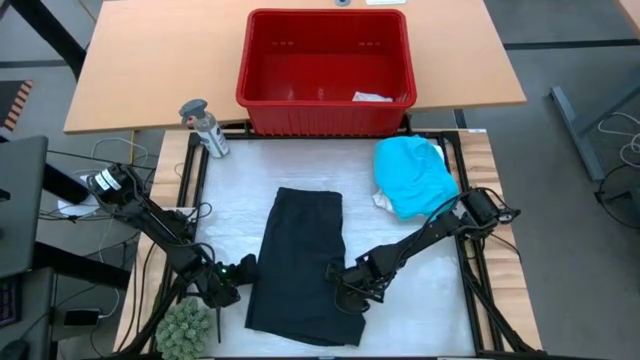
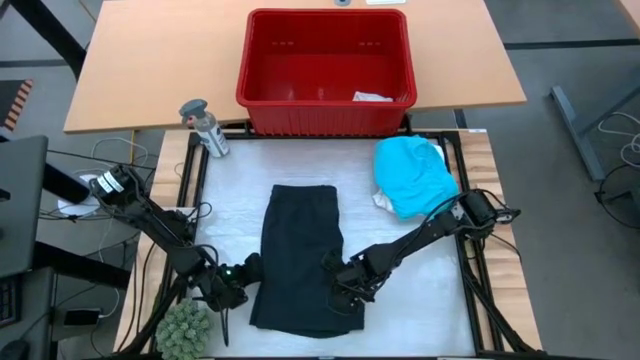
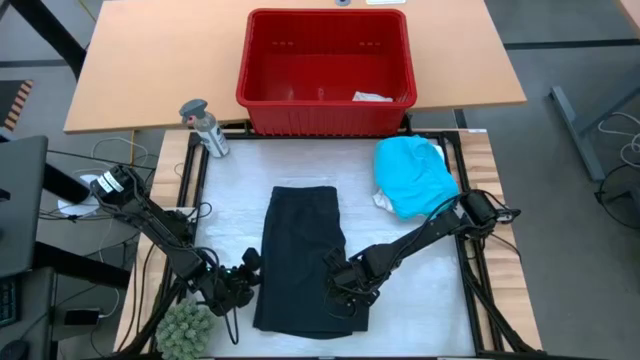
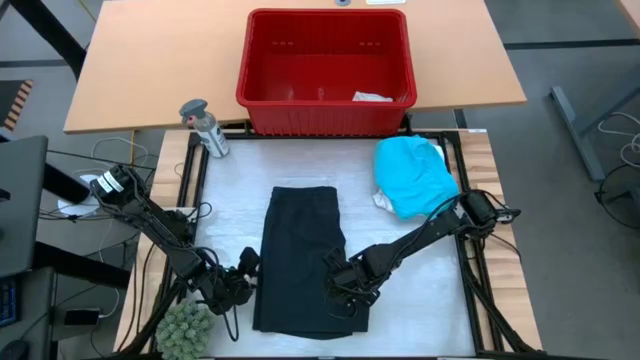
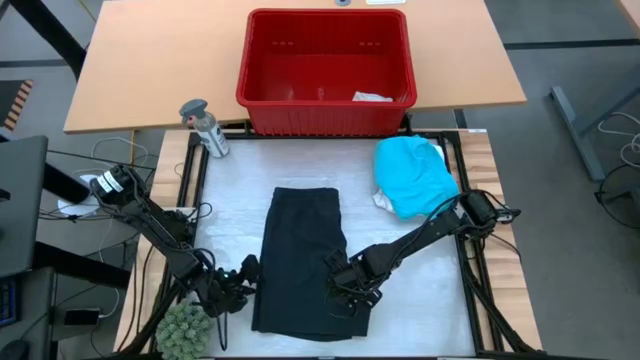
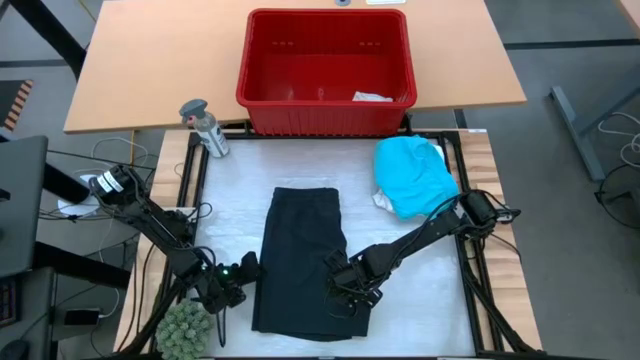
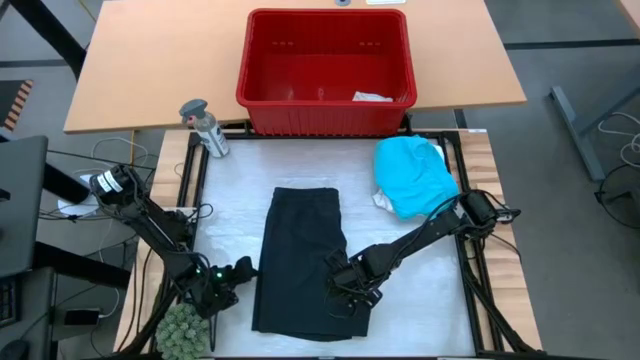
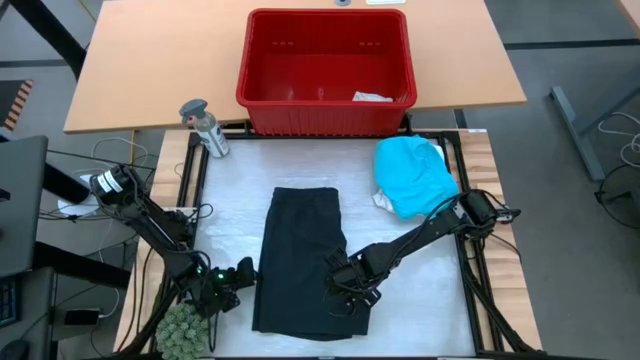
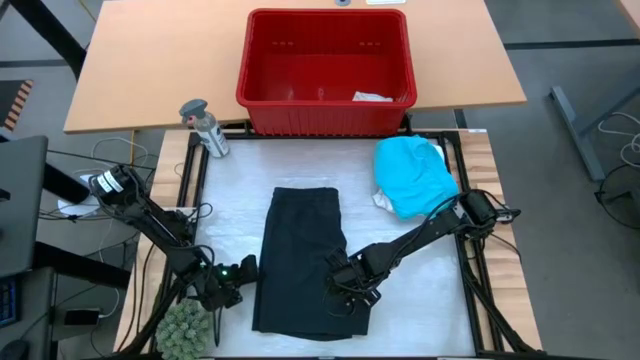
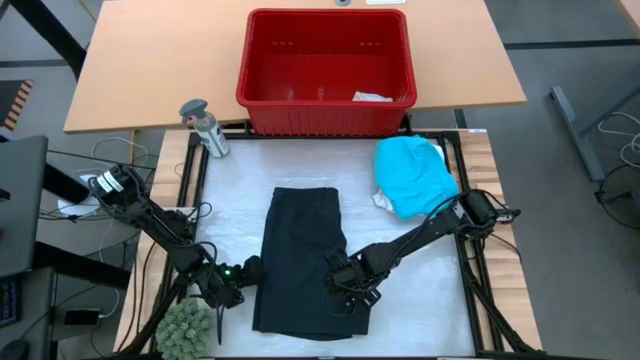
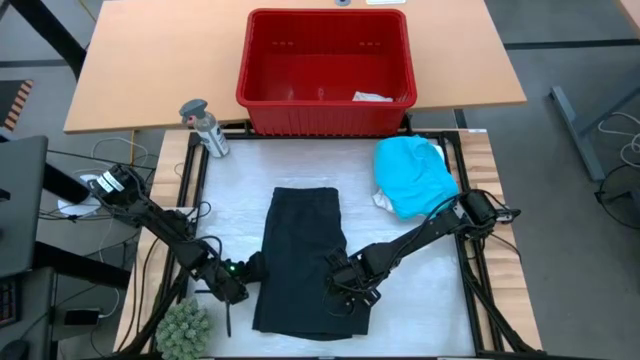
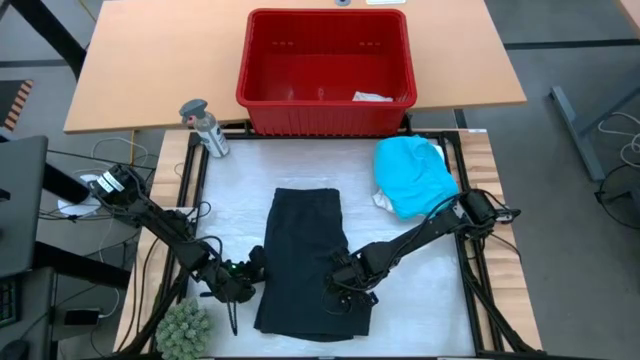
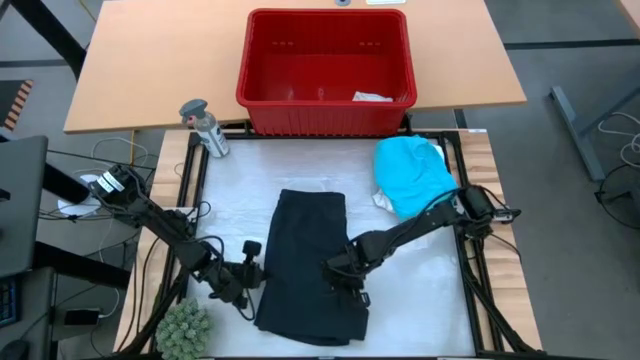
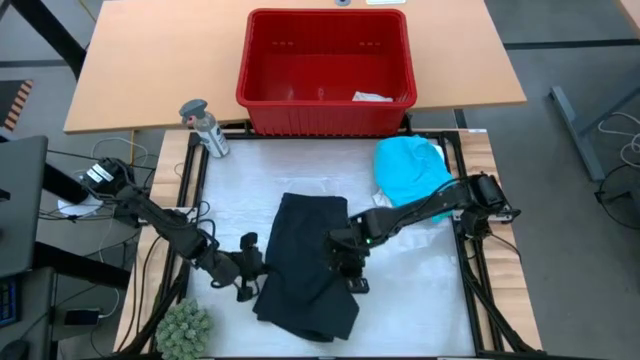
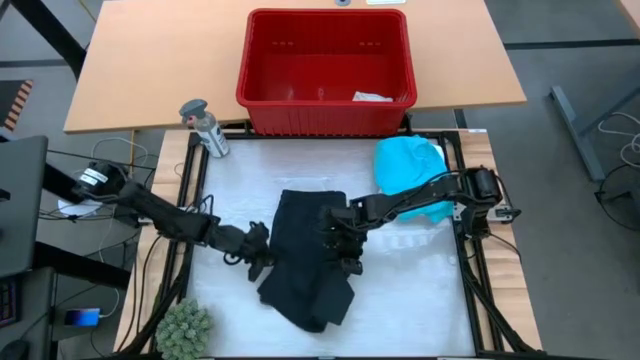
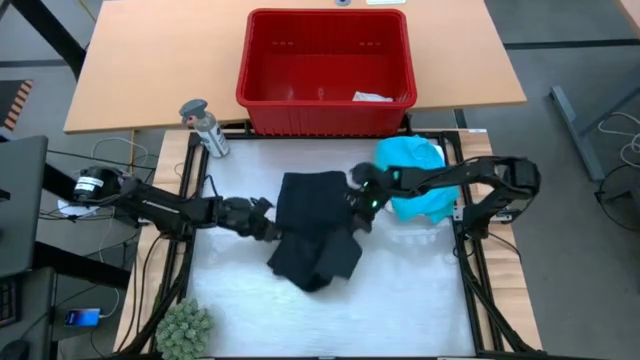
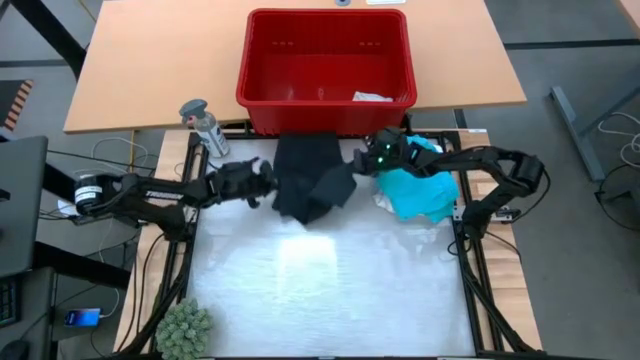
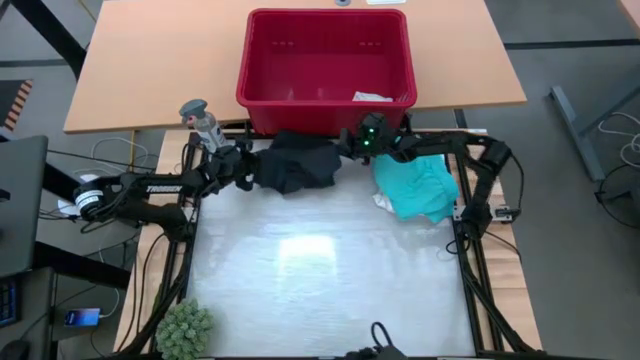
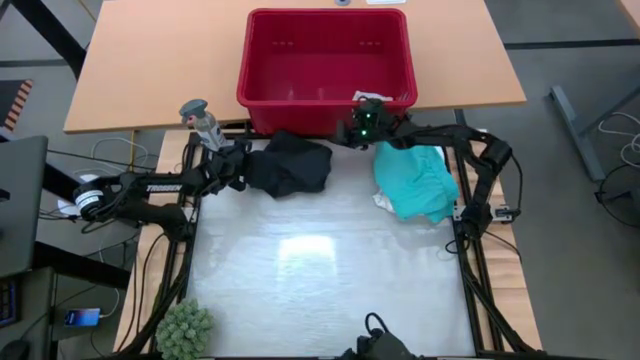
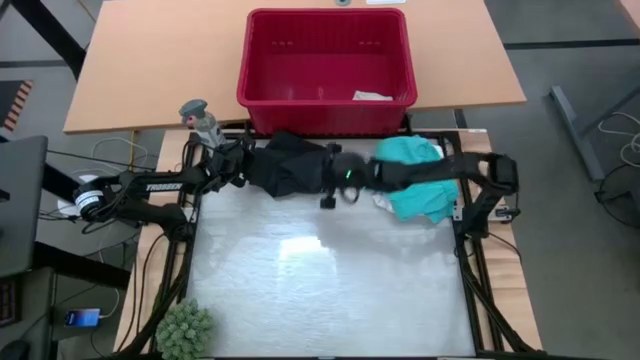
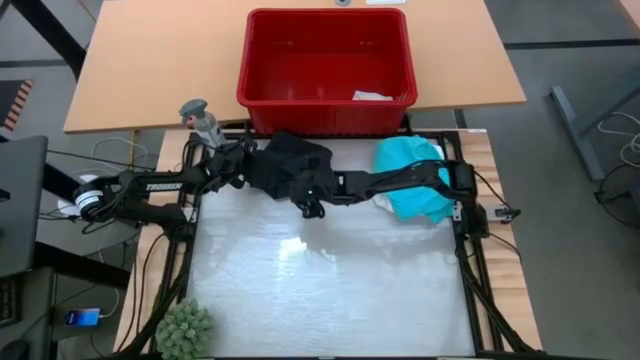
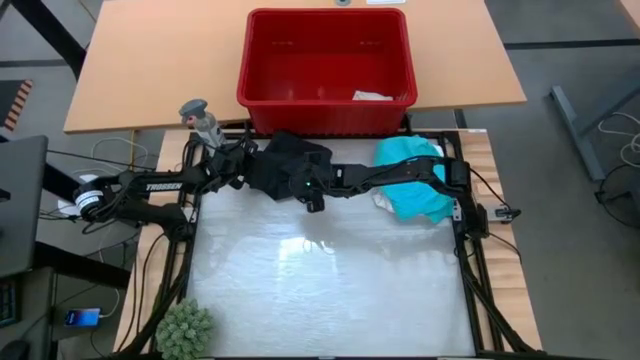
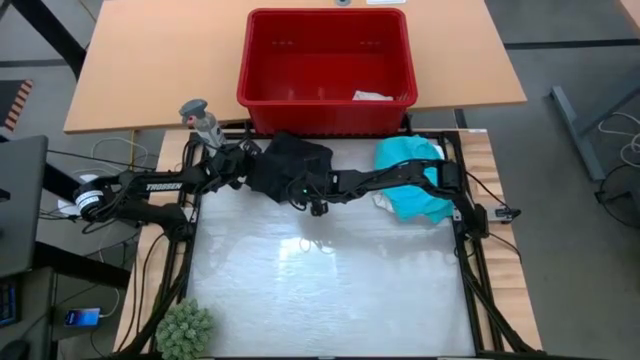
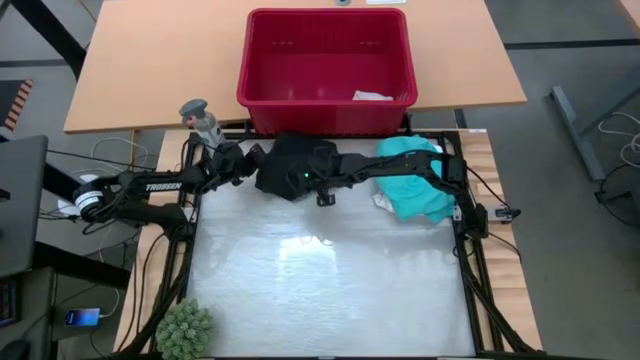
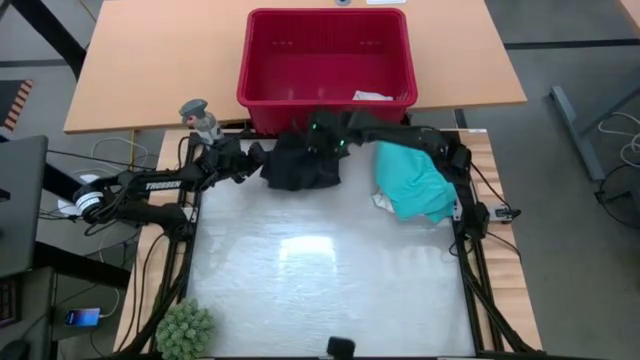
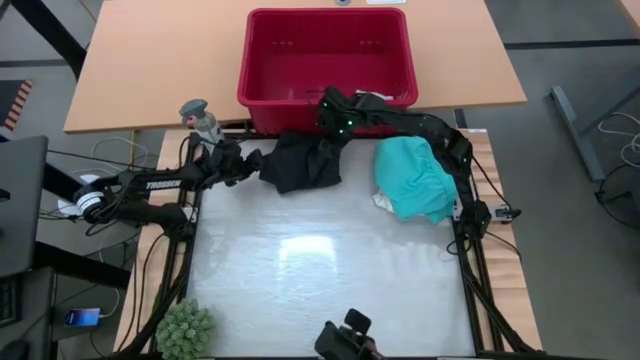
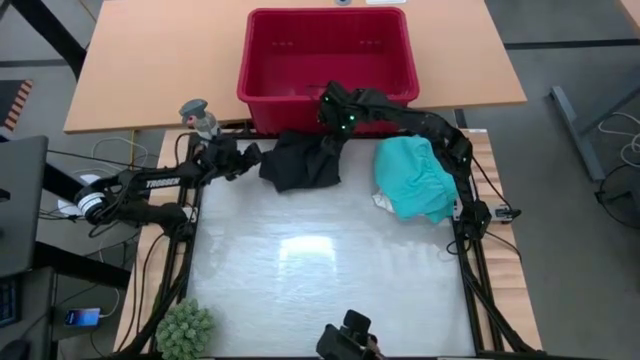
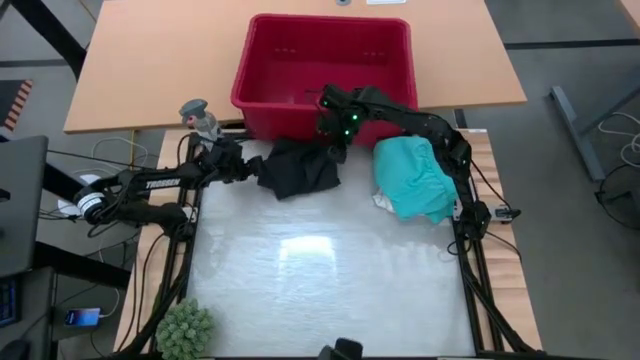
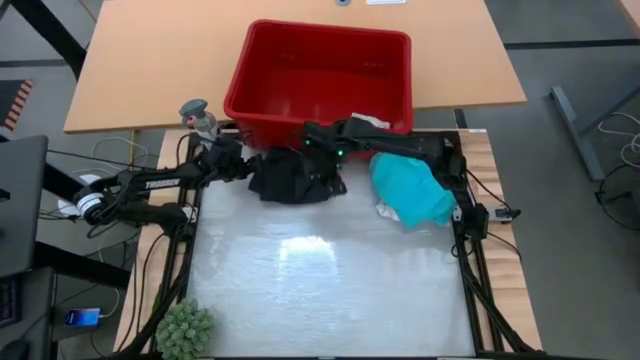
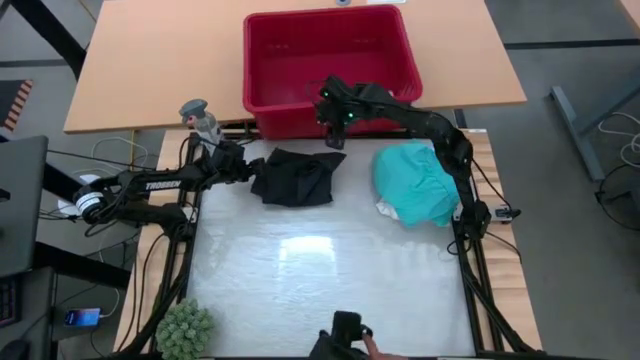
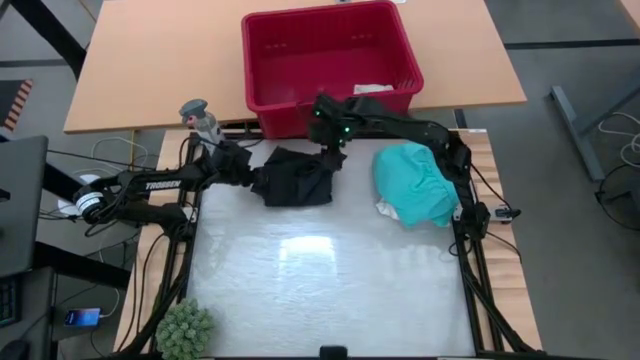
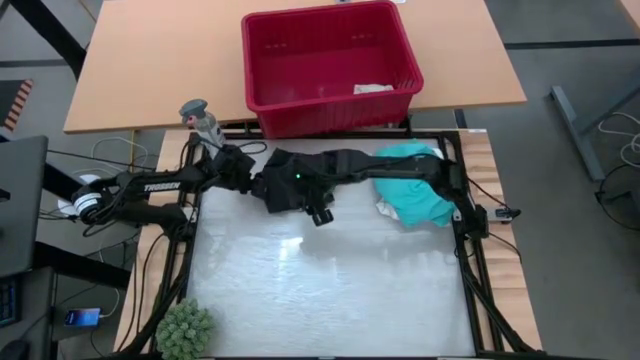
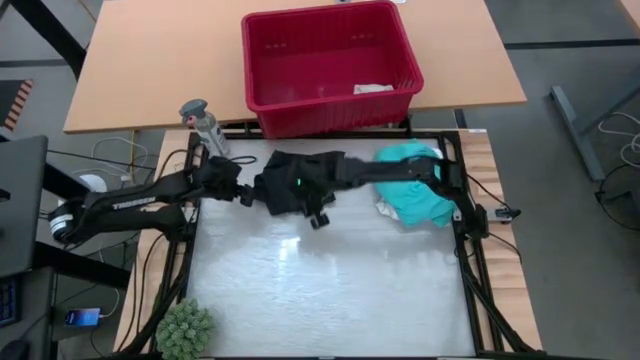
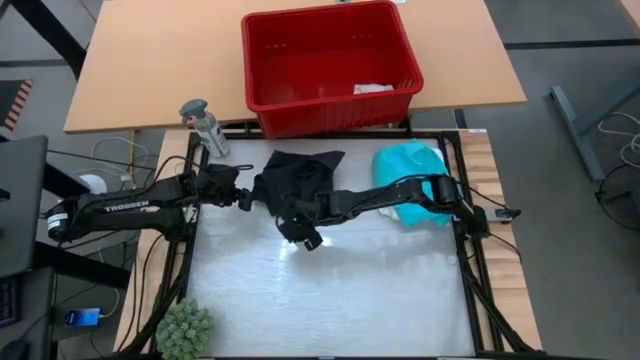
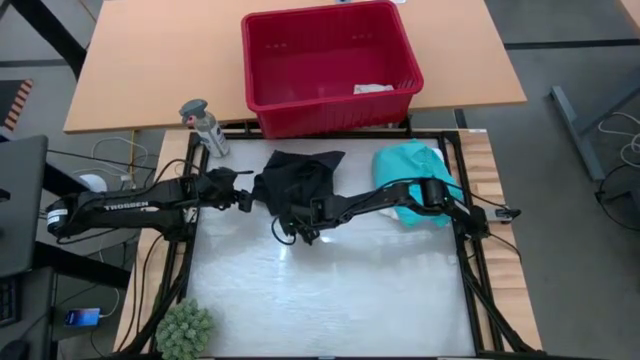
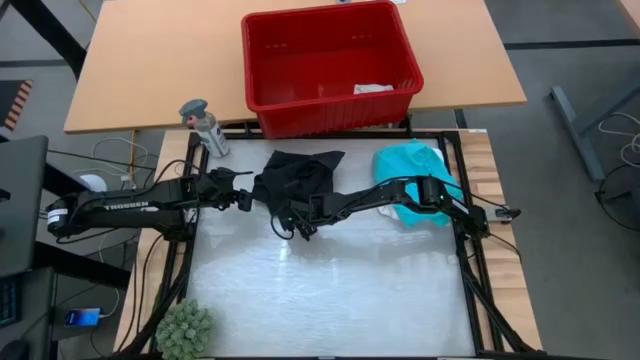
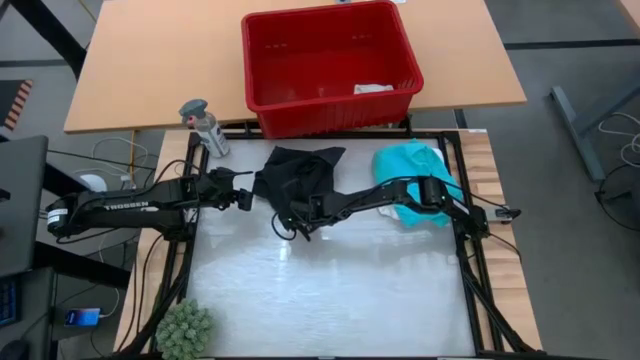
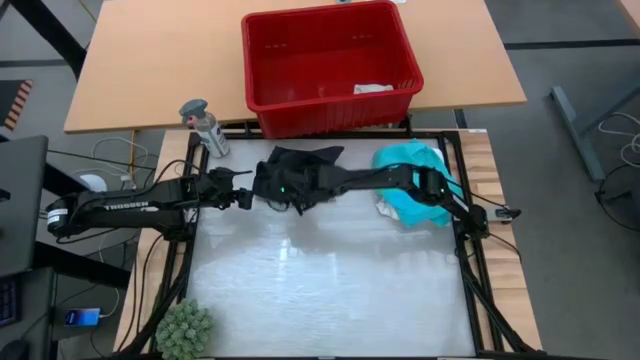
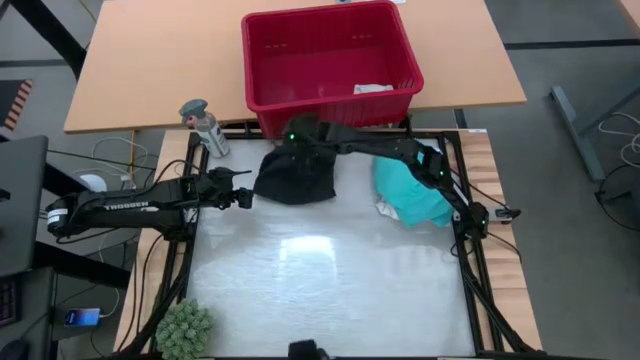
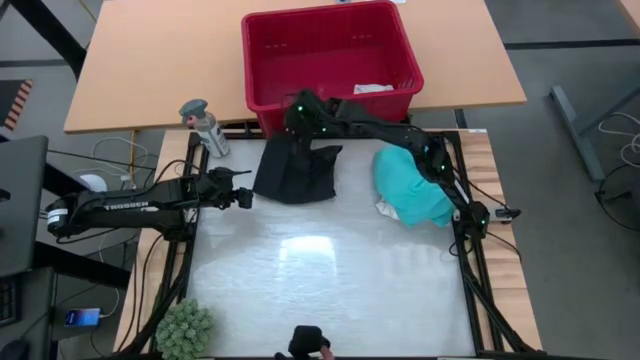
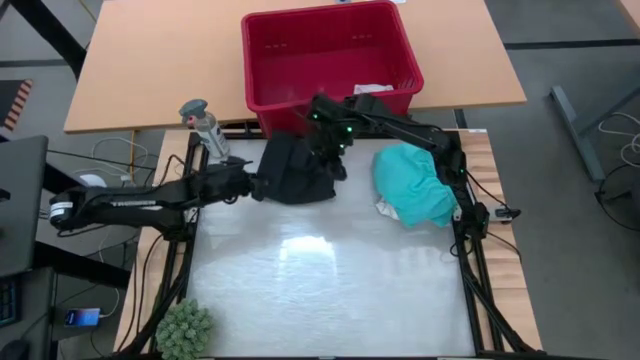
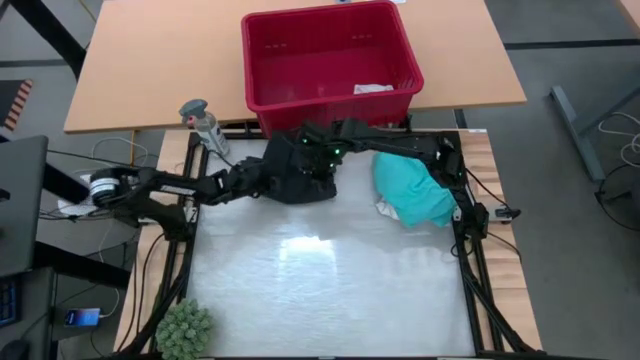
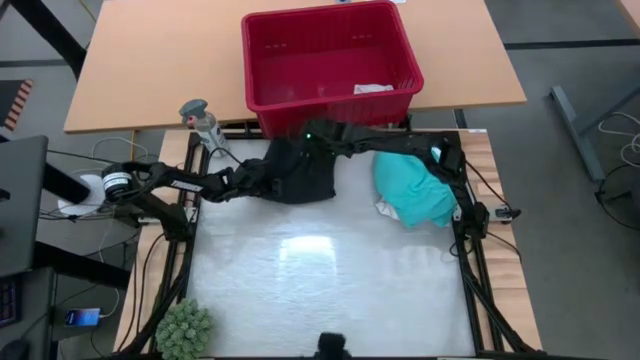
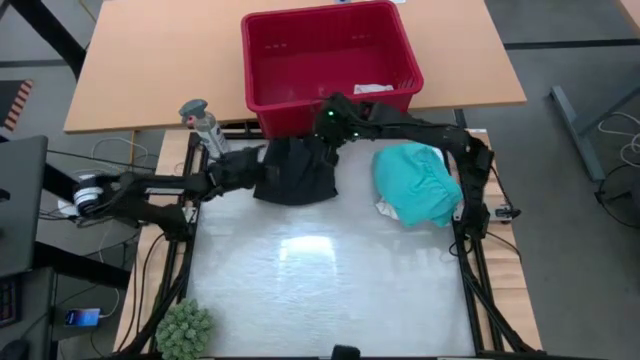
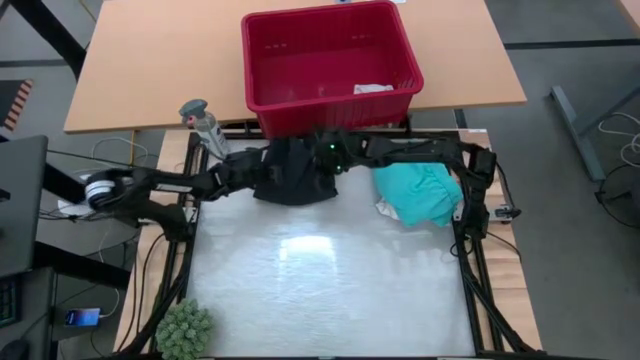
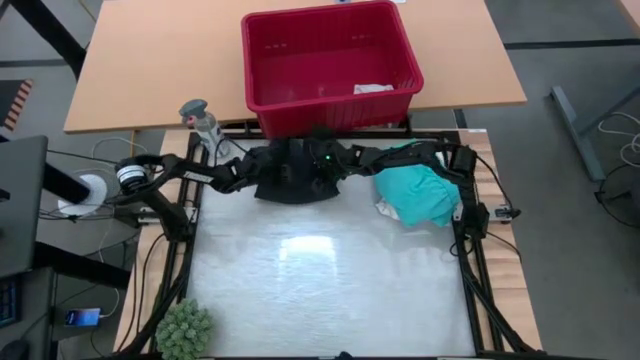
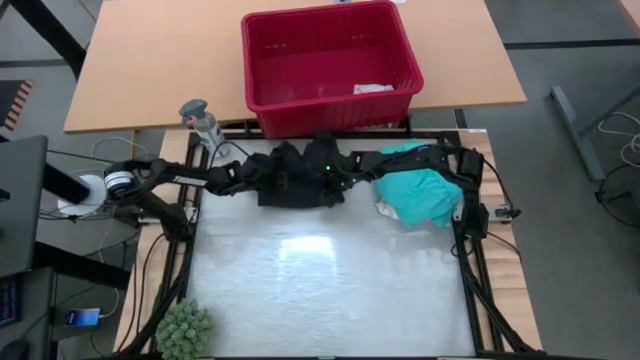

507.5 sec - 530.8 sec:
Task: Fold Laundry from Bin
Fold the black shorts
